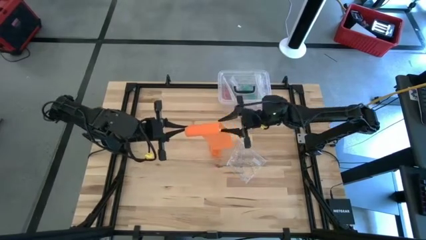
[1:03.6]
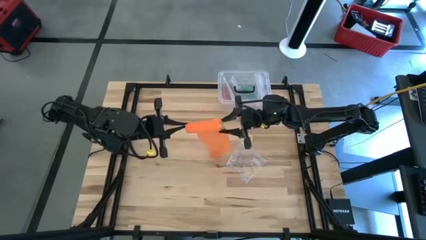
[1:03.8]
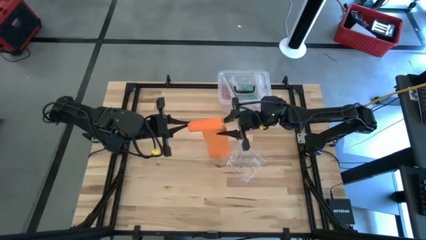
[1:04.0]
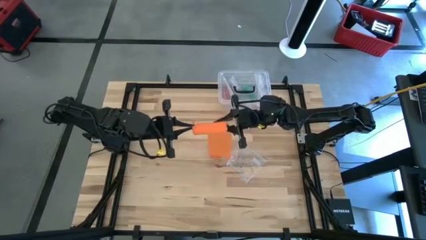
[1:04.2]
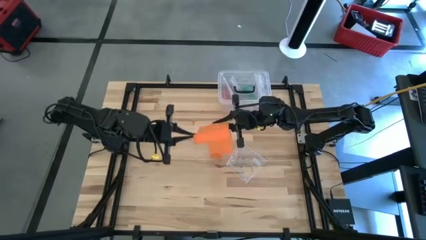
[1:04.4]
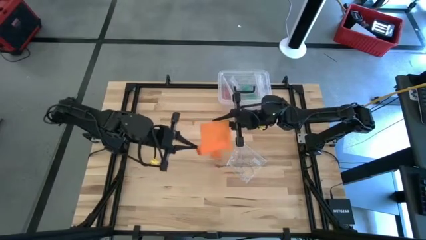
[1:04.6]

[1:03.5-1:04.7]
Task: Roll bandage
Roll the orange bandage

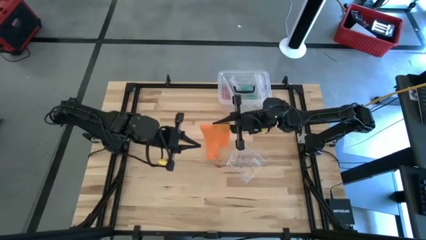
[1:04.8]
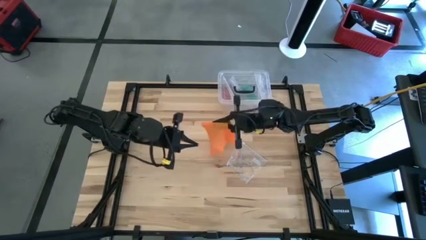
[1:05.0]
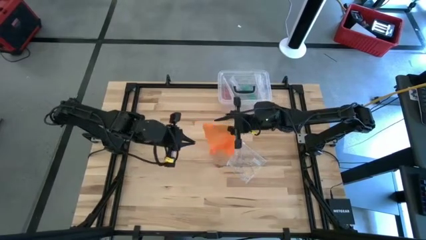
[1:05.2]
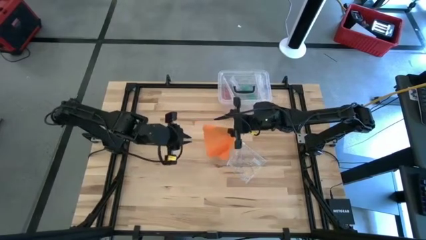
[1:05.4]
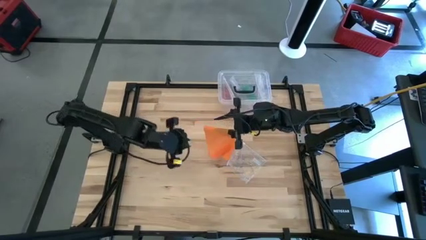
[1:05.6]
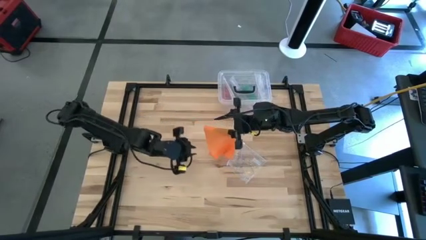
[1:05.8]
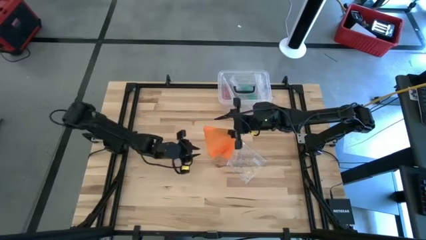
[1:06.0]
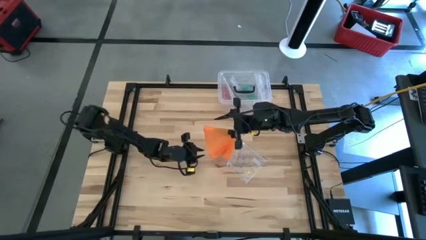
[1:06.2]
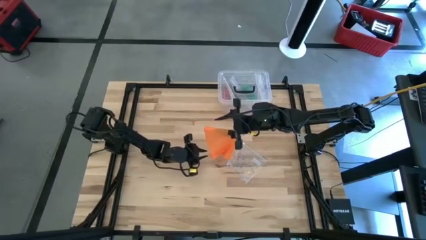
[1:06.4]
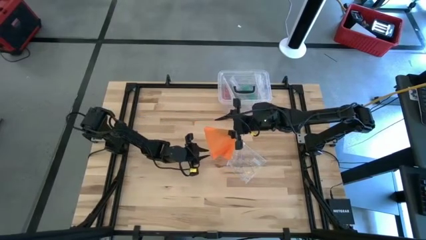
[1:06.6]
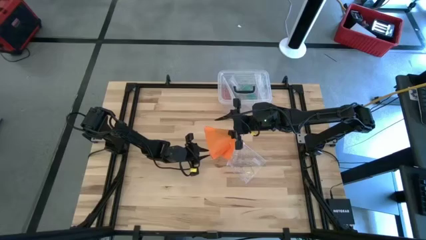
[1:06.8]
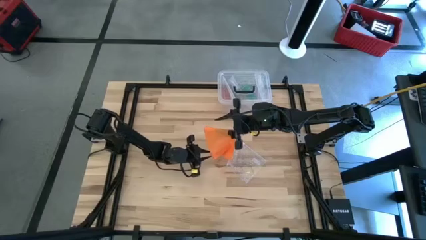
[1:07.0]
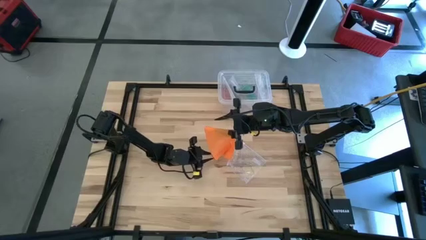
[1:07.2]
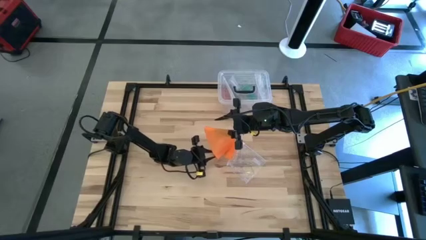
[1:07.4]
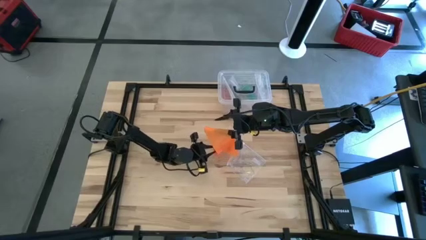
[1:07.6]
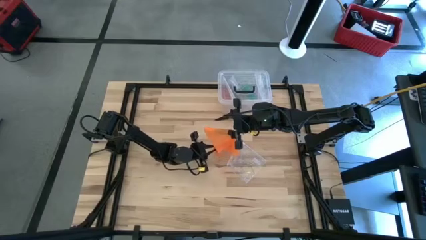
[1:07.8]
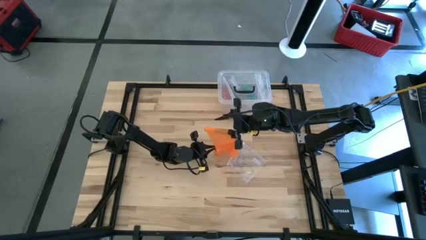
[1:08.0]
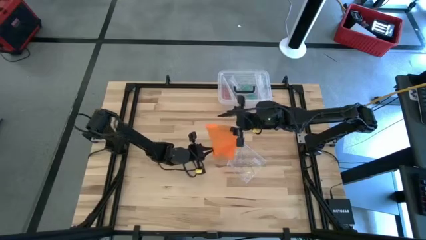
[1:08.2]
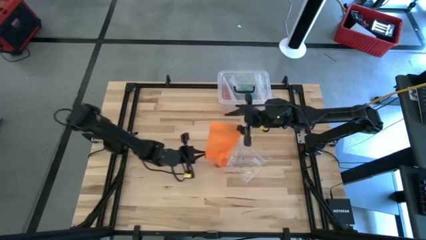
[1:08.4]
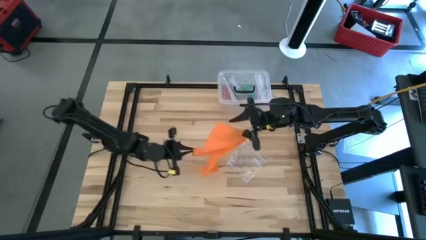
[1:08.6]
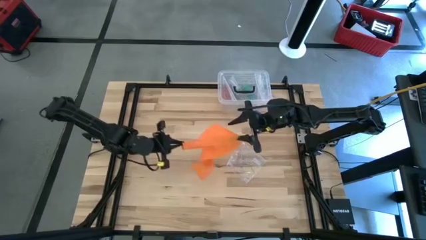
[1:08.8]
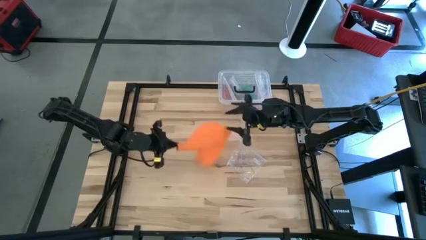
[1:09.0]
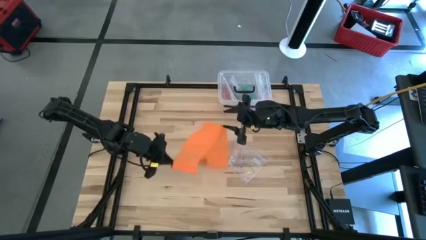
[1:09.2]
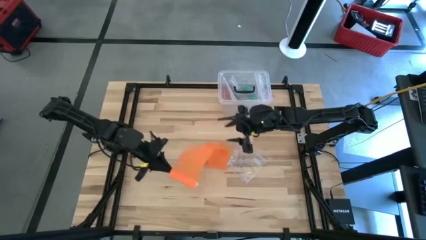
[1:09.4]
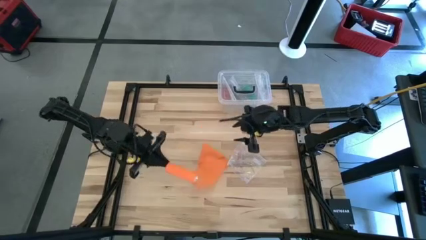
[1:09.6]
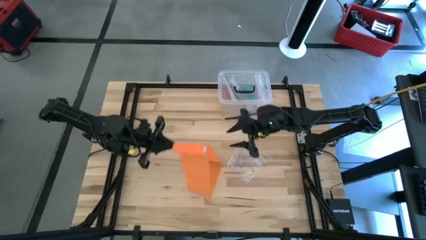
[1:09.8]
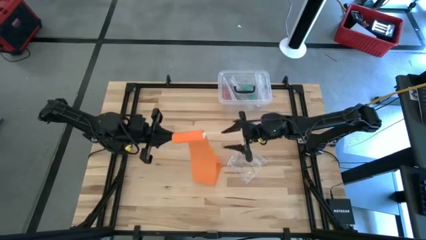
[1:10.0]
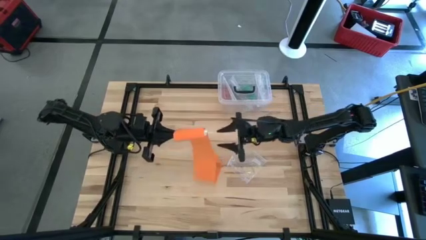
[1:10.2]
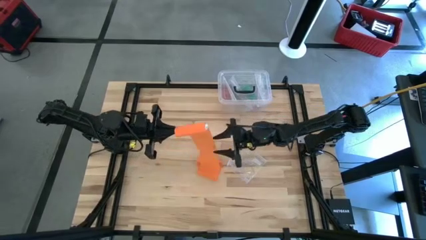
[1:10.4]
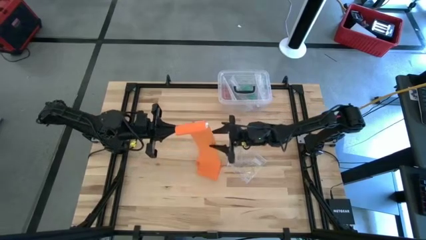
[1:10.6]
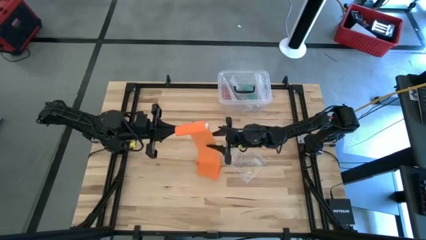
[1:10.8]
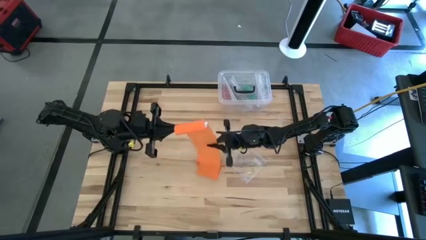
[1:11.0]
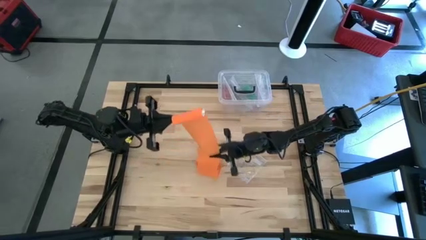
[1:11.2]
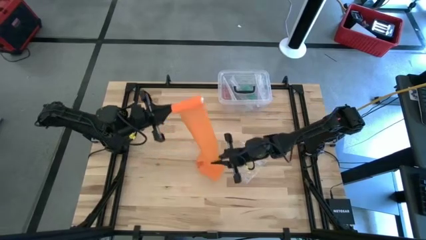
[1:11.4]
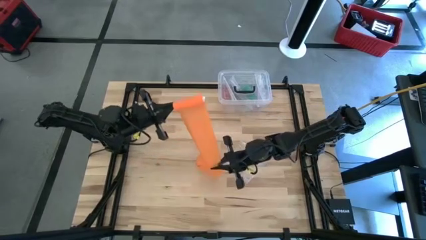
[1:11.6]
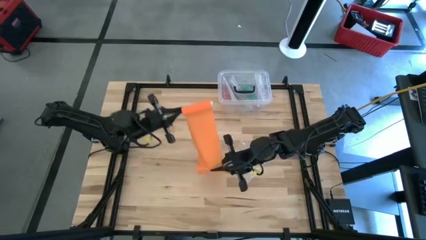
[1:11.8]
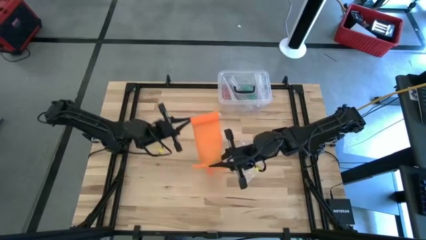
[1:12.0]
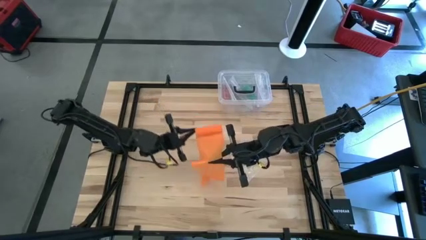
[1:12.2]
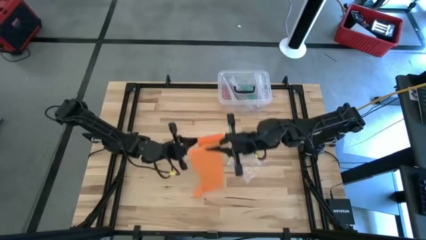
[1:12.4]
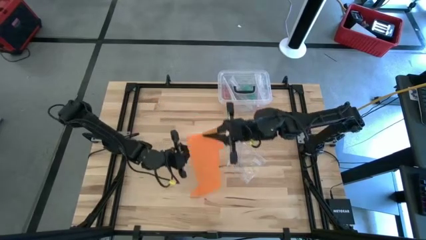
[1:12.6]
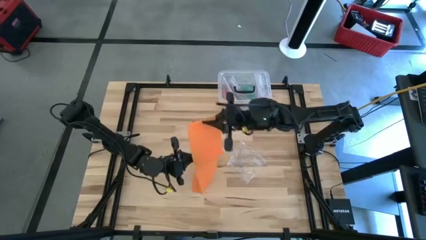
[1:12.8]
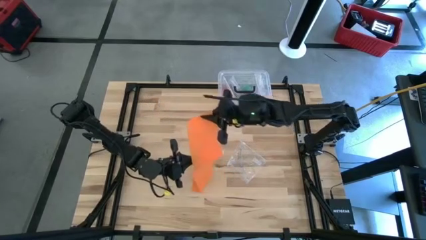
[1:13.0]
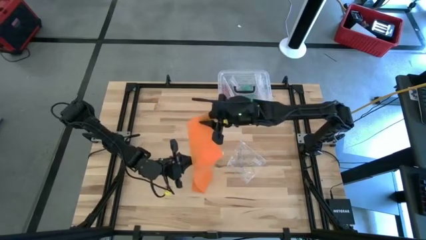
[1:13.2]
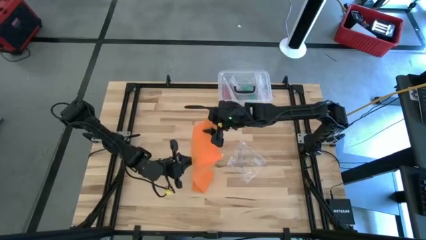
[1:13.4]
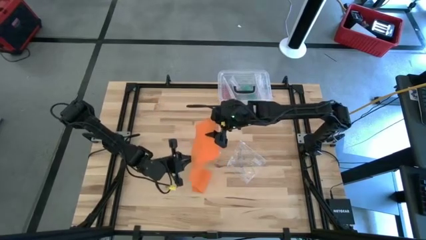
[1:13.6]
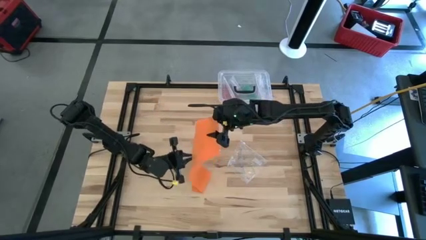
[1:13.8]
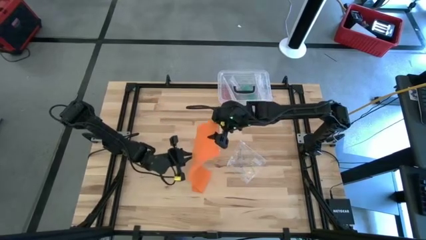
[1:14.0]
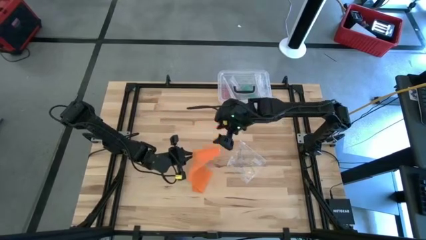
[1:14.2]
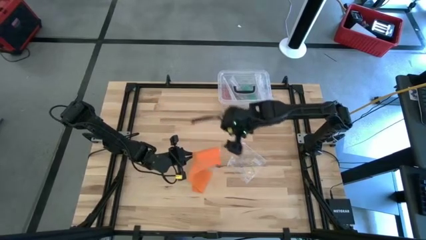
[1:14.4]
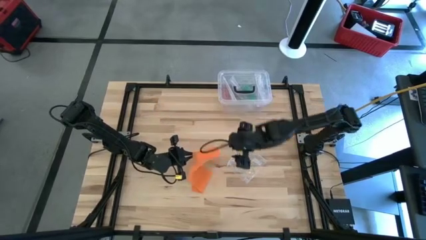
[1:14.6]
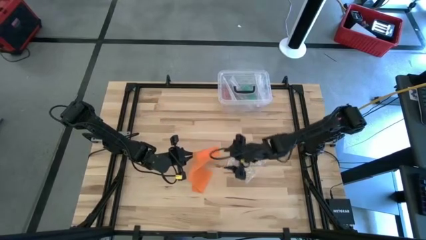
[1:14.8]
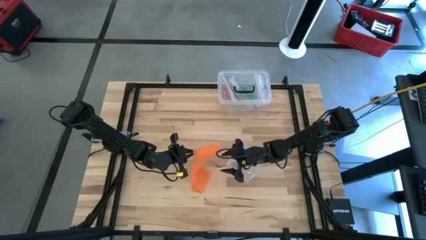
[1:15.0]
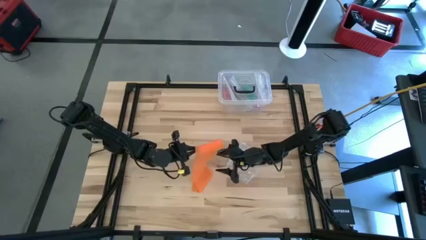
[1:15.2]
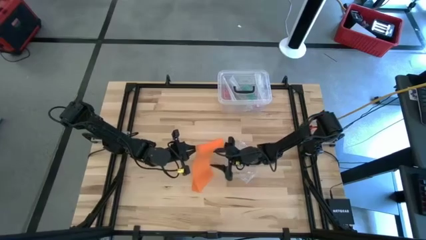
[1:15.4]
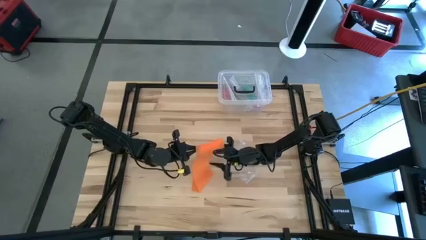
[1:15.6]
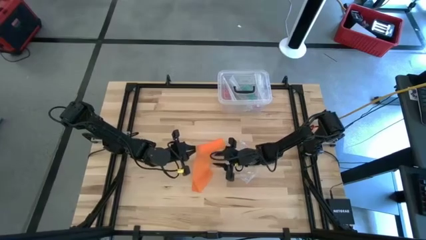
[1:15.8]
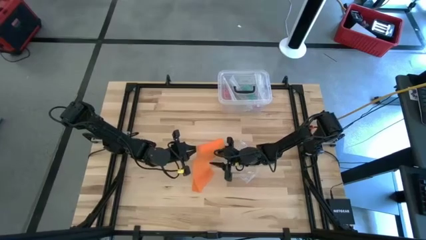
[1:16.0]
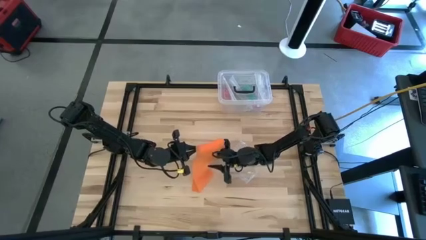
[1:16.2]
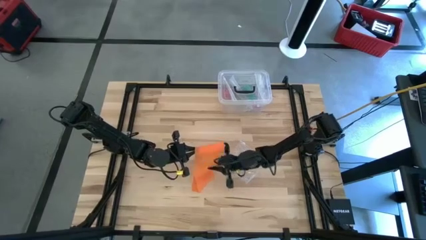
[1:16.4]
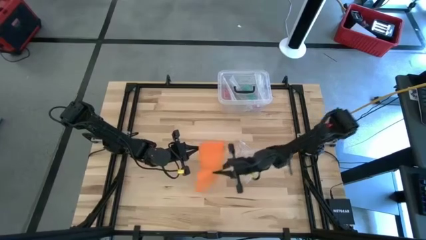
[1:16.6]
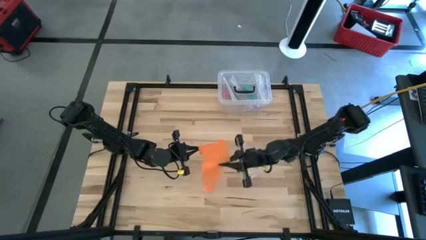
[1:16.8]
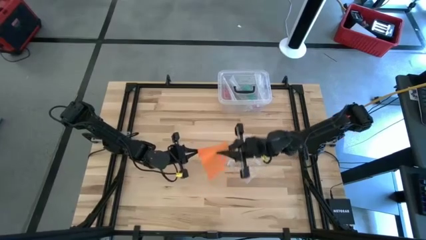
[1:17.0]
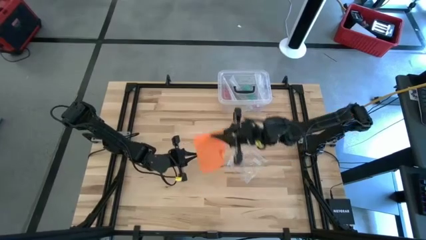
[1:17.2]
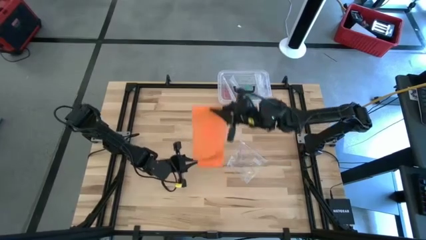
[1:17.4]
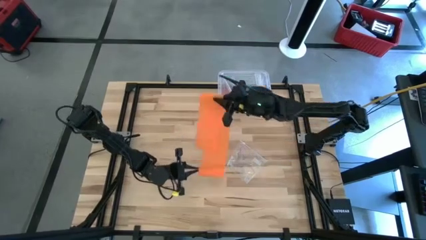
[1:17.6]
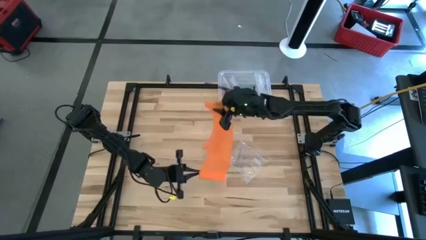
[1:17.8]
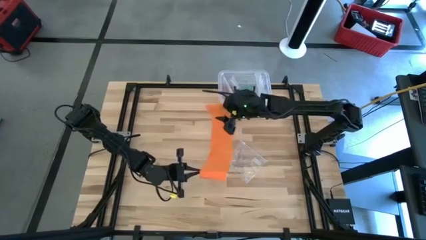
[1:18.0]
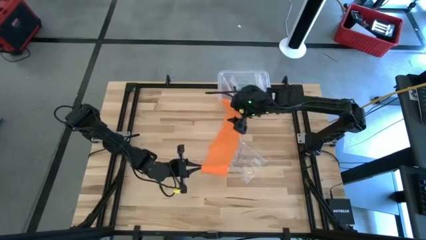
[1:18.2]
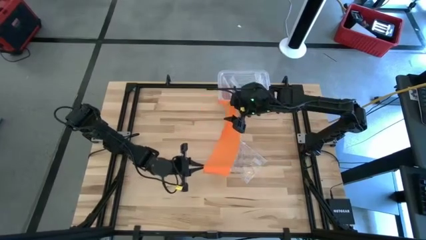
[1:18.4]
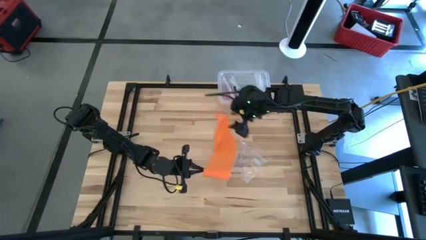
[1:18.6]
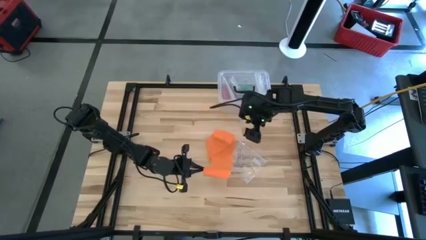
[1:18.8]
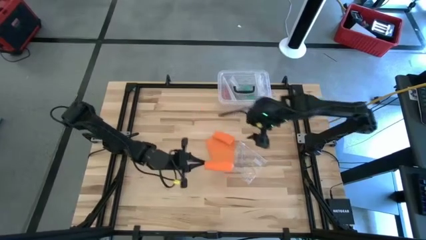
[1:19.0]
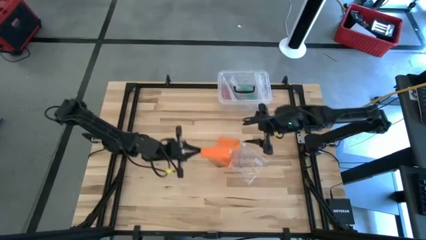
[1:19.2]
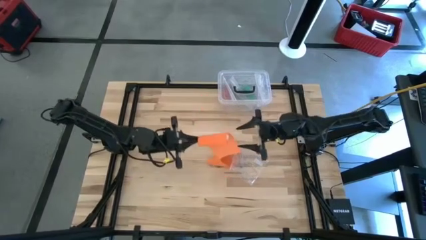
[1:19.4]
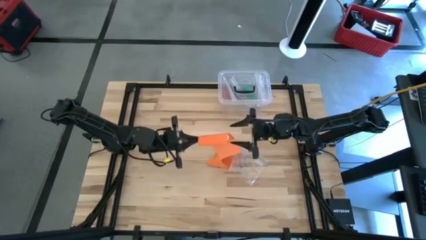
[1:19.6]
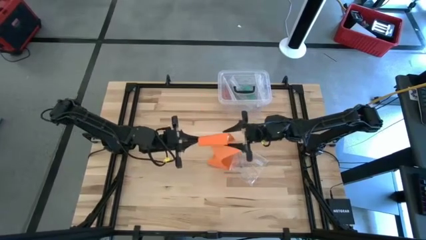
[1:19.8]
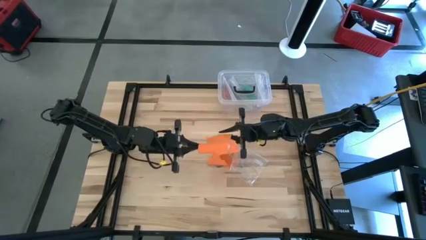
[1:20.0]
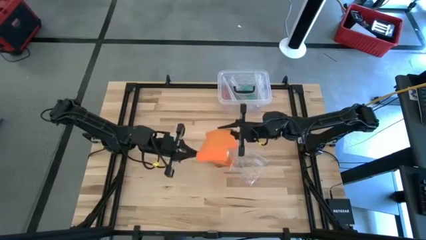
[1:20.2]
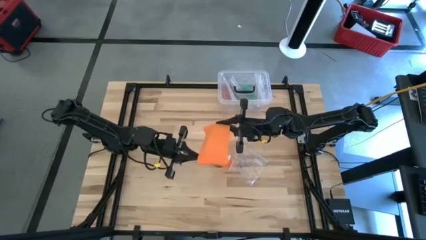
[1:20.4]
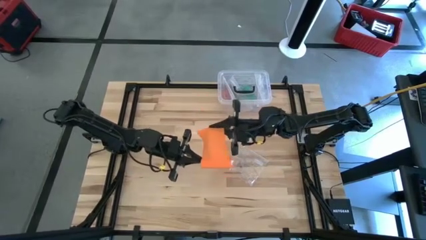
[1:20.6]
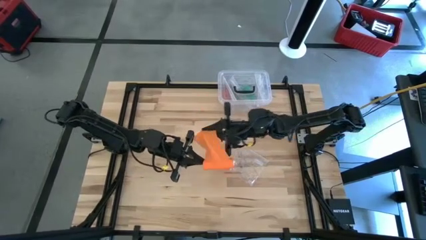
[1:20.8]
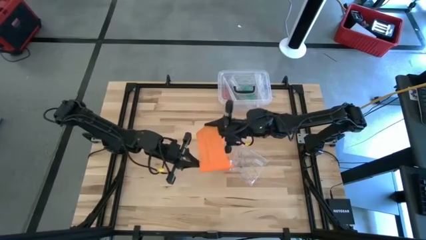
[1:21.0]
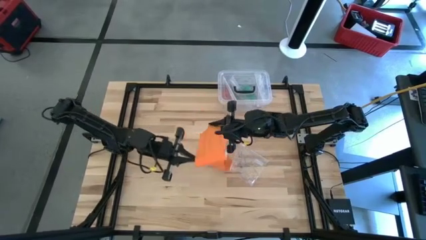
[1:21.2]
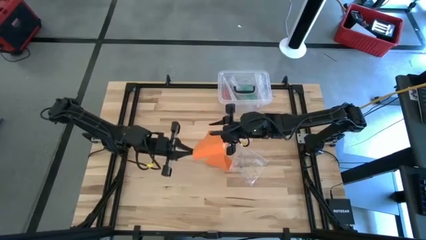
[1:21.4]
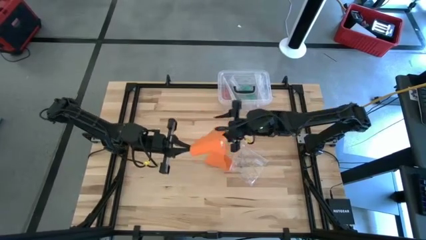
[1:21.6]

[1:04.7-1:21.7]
Roll the orange bandage
